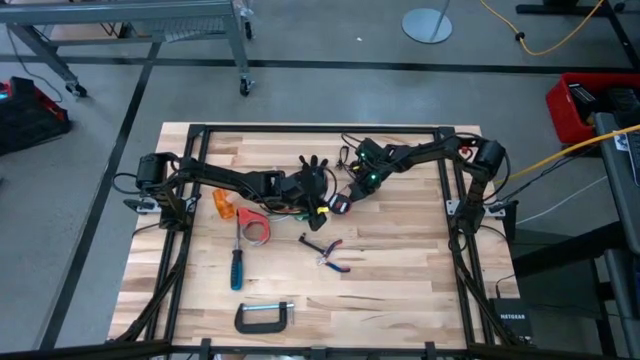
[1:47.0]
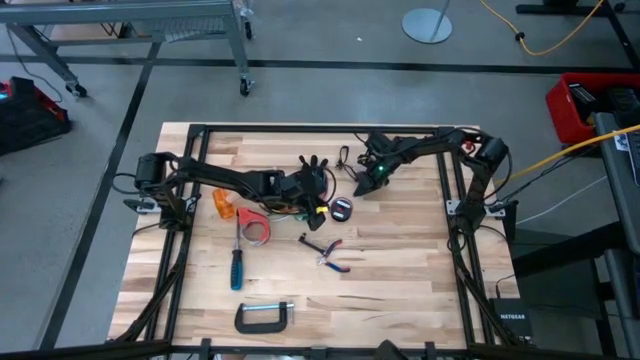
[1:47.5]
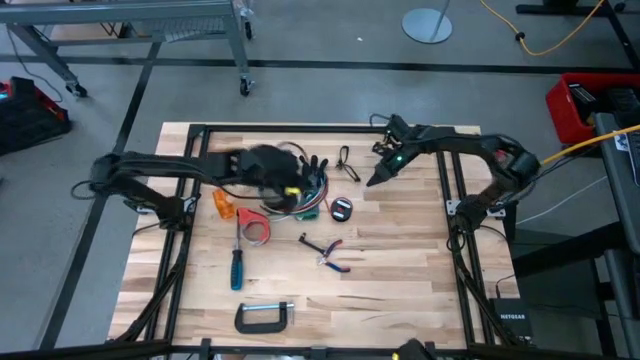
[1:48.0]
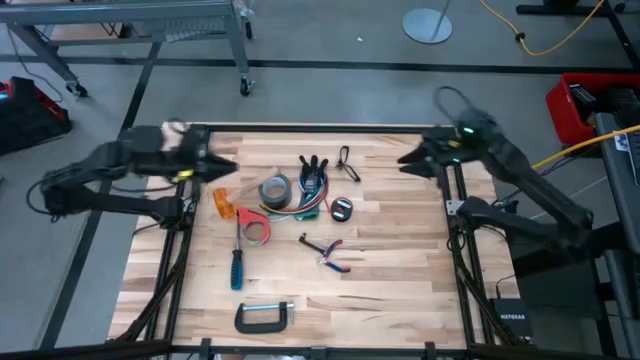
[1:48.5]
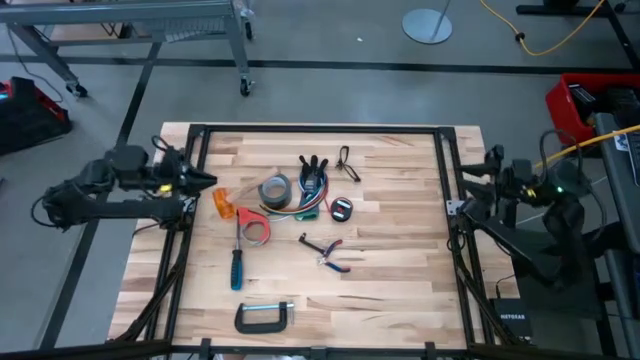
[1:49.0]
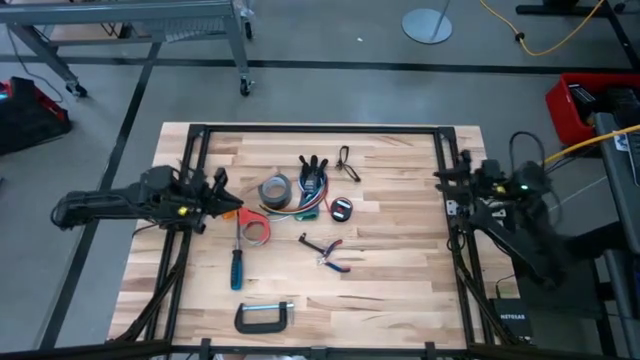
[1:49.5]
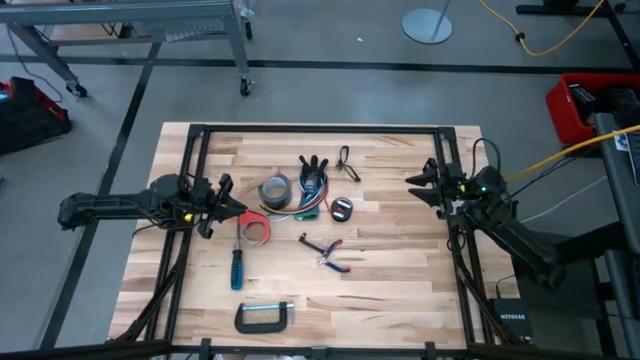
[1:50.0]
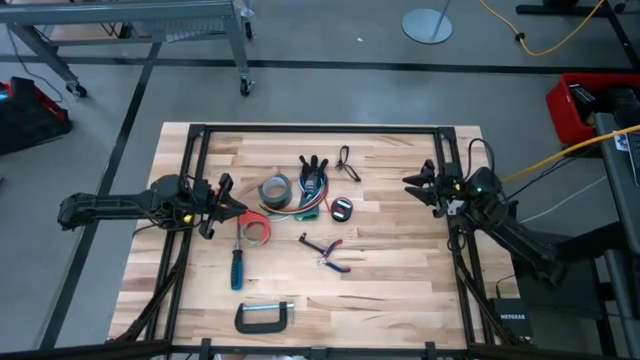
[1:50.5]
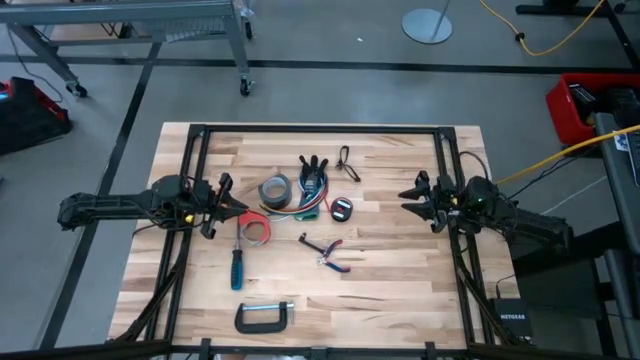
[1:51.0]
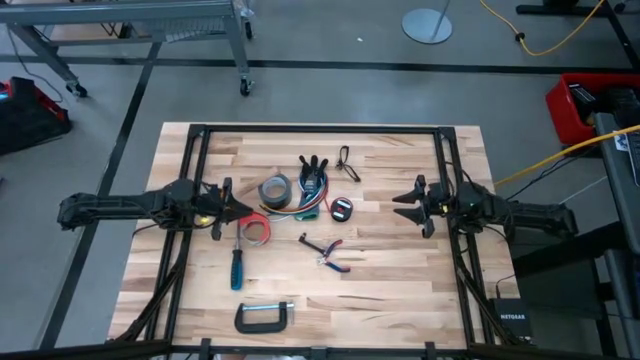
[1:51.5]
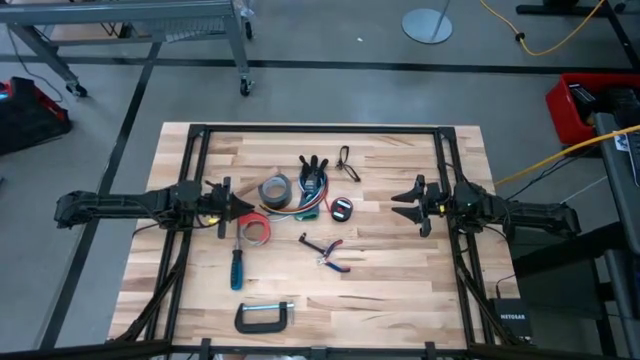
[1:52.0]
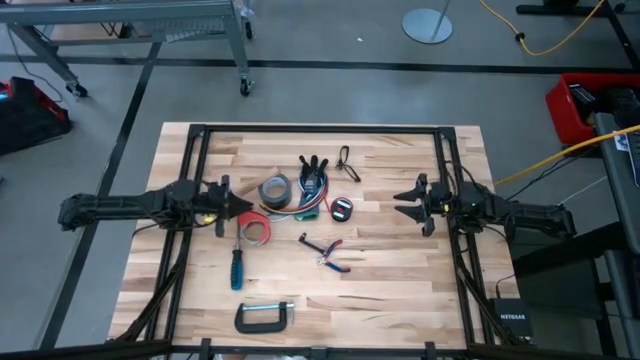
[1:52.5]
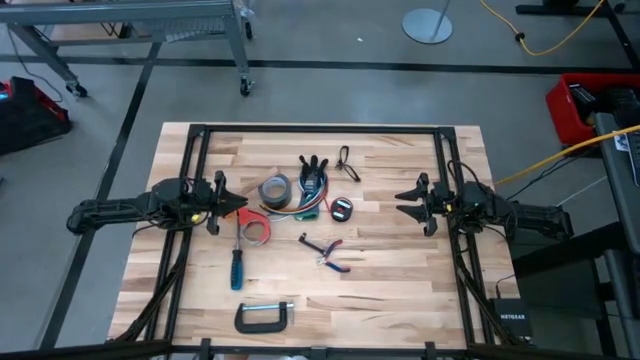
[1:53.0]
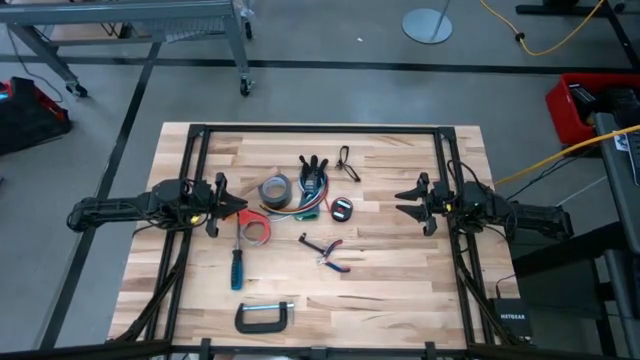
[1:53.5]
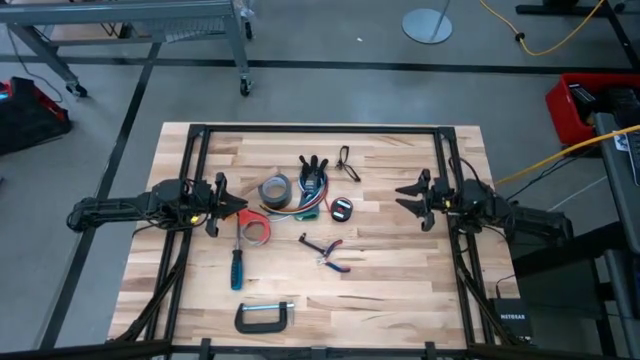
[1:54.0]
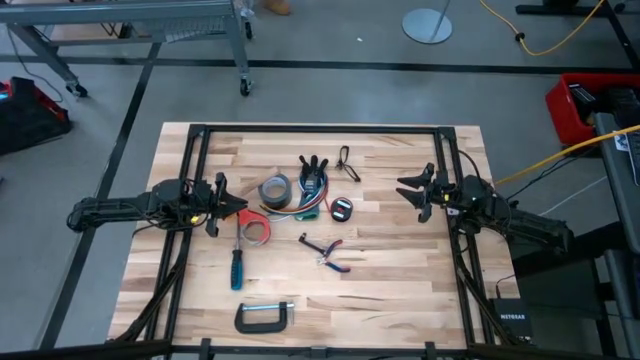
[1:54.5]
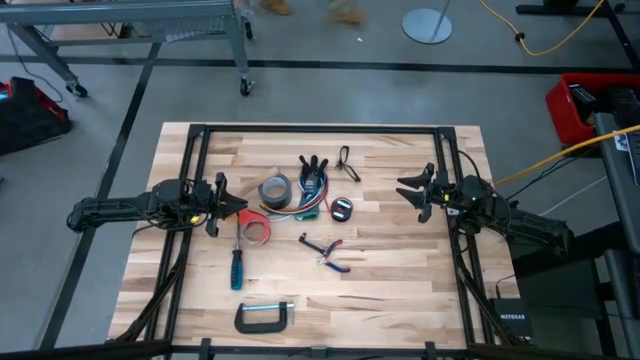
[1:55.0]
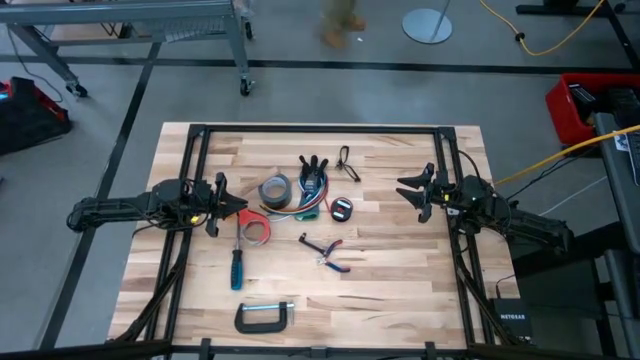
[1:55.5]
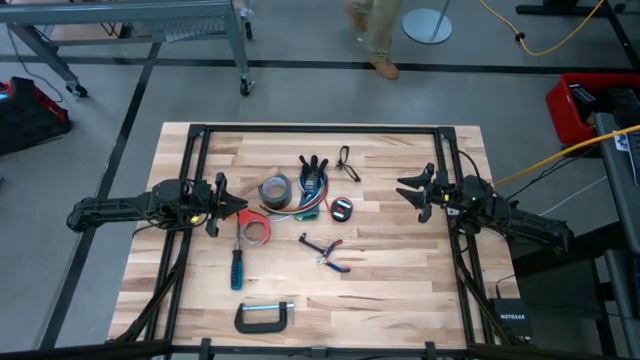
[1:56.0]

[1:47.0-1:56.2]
Task: Coil cords
Return to Home Position

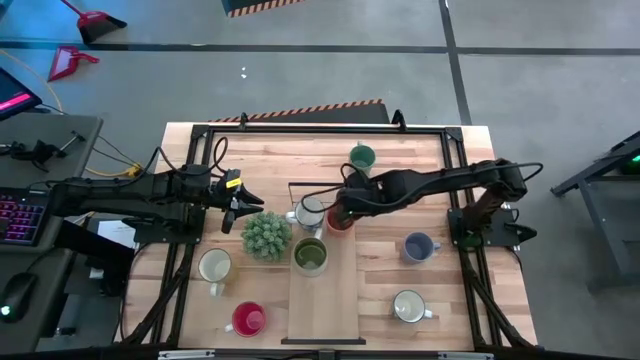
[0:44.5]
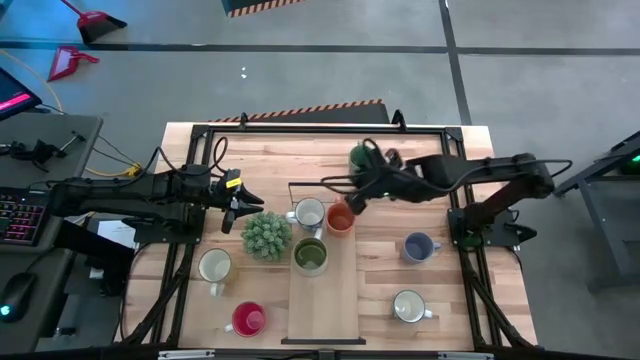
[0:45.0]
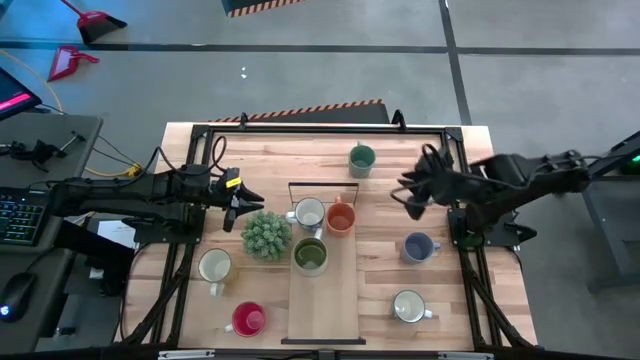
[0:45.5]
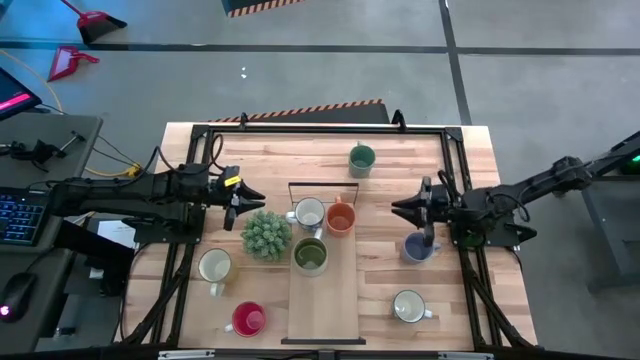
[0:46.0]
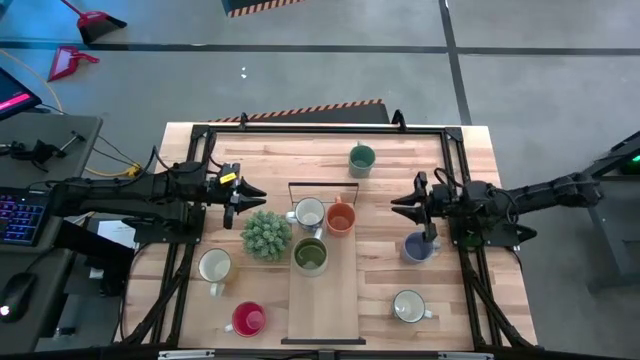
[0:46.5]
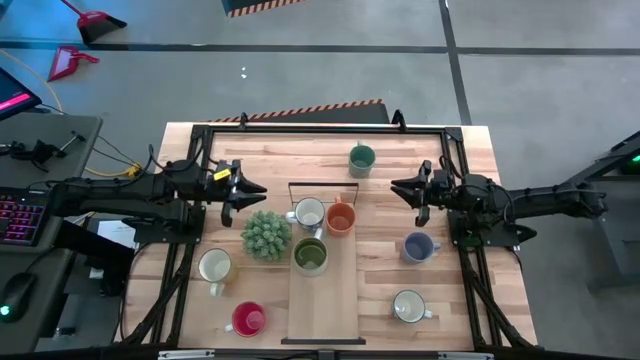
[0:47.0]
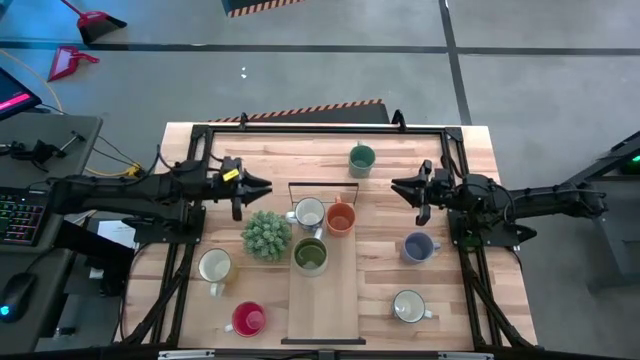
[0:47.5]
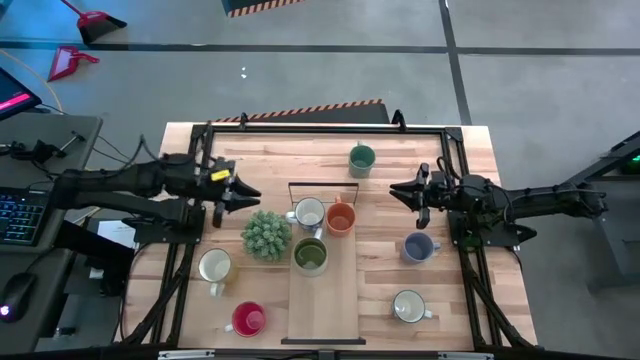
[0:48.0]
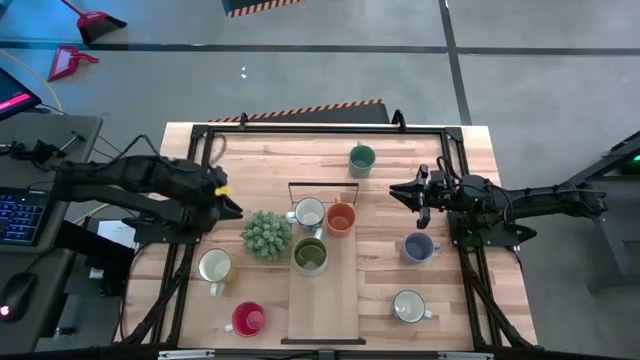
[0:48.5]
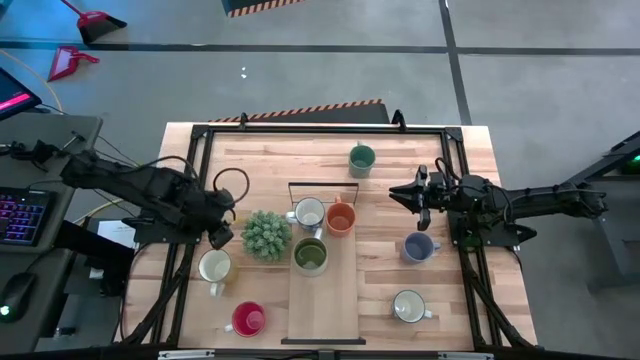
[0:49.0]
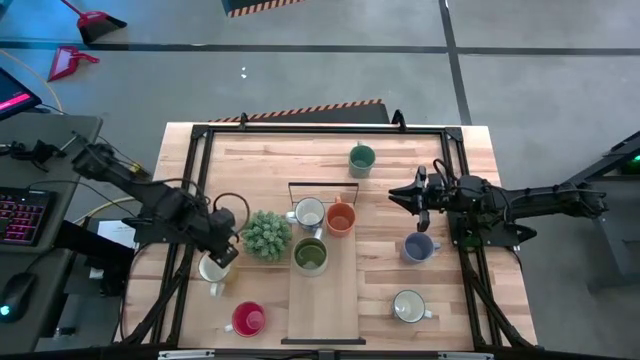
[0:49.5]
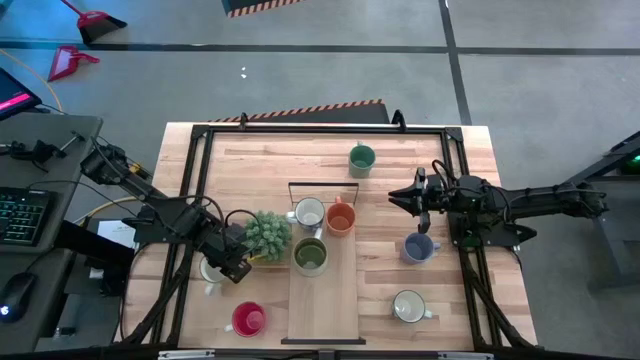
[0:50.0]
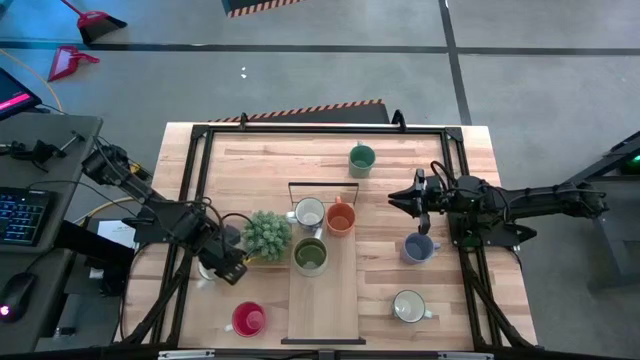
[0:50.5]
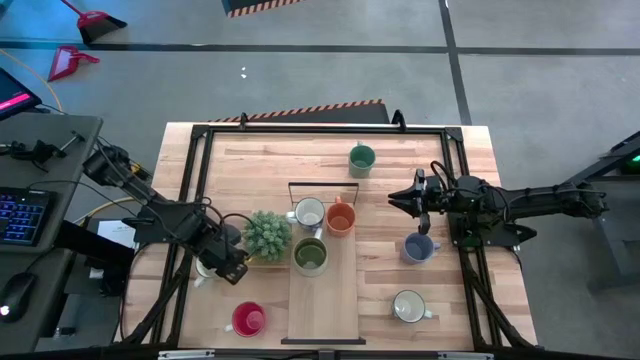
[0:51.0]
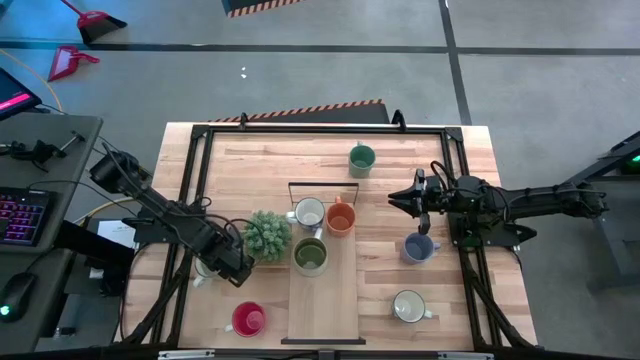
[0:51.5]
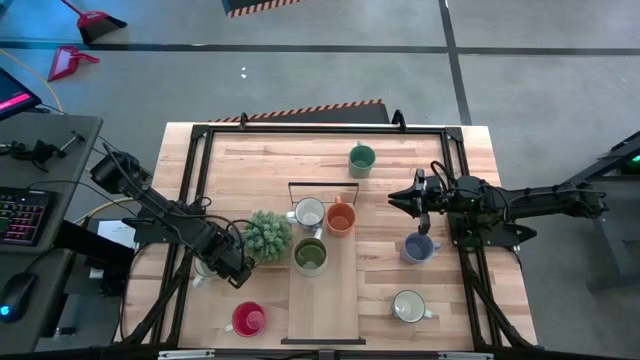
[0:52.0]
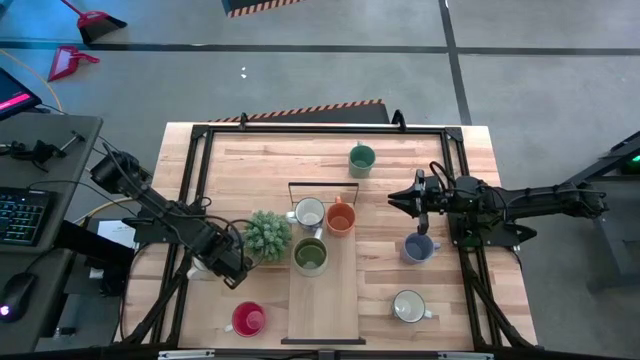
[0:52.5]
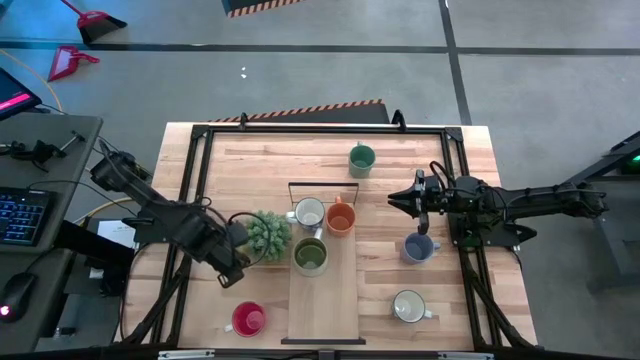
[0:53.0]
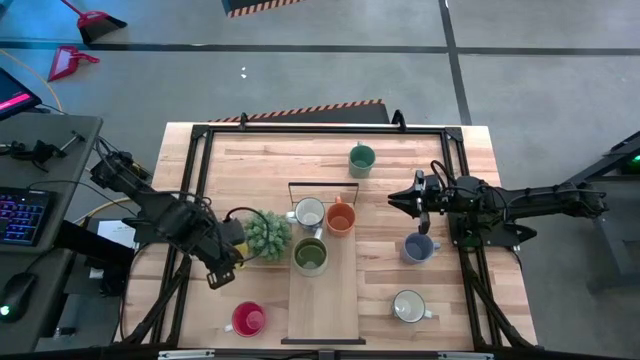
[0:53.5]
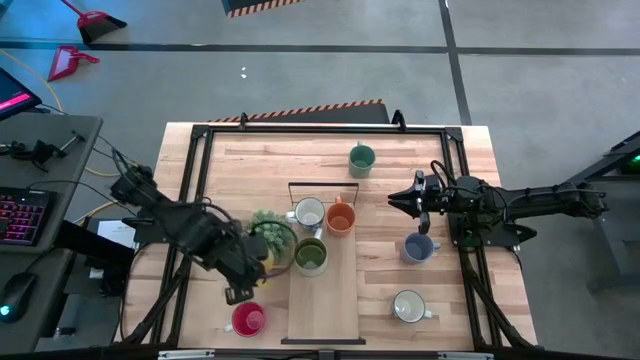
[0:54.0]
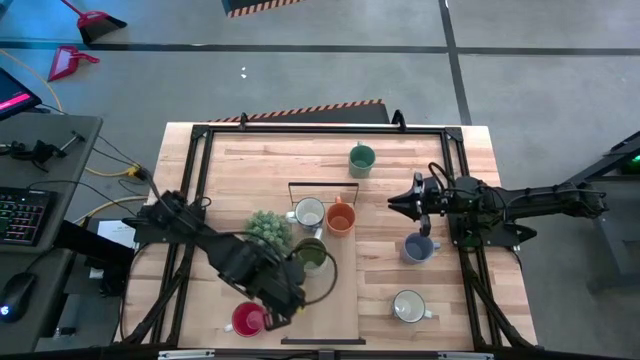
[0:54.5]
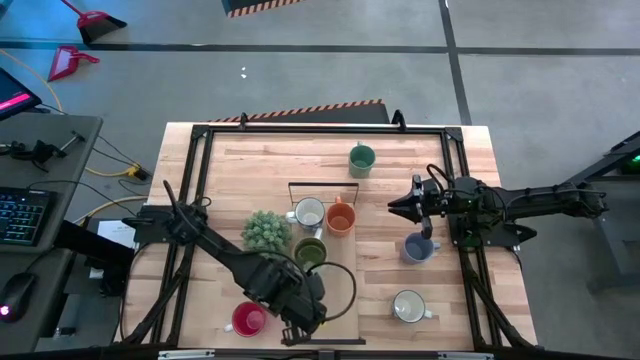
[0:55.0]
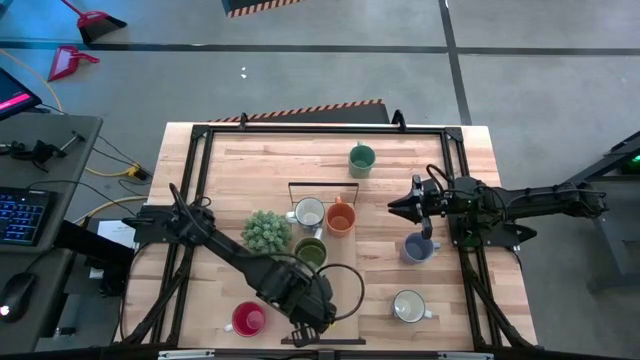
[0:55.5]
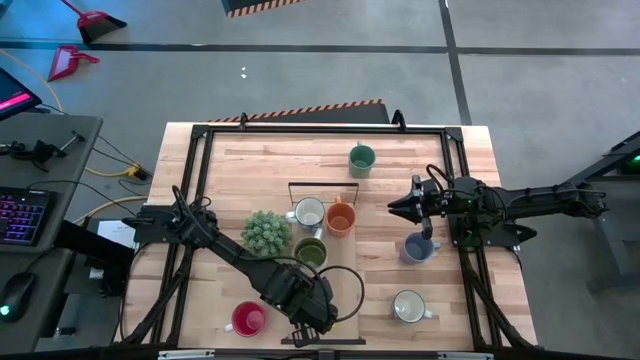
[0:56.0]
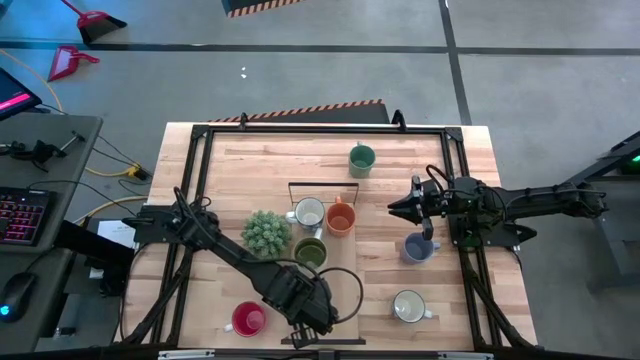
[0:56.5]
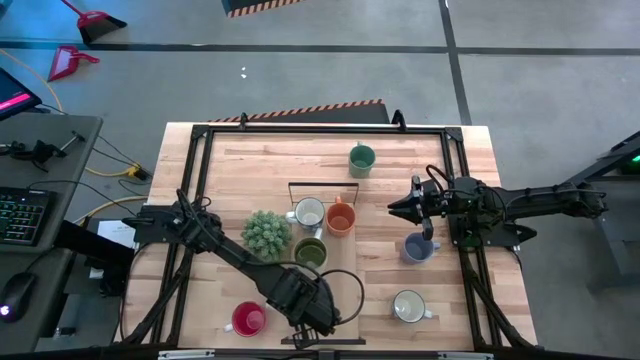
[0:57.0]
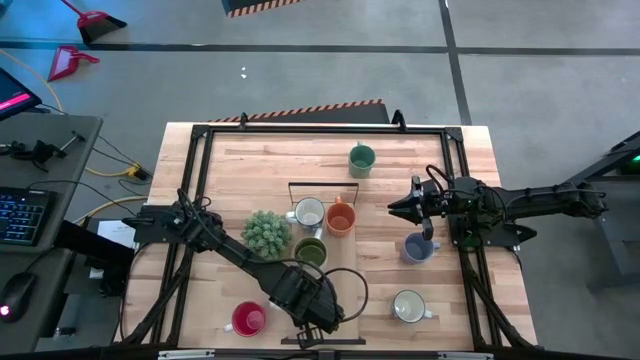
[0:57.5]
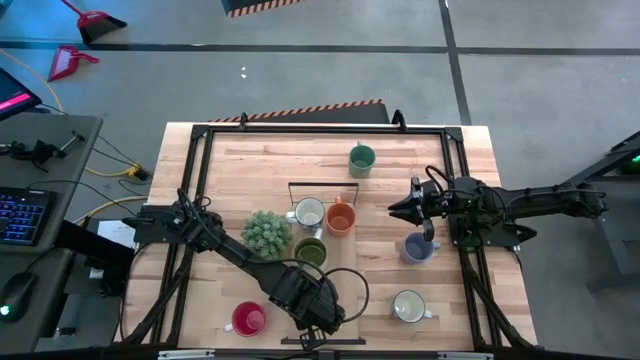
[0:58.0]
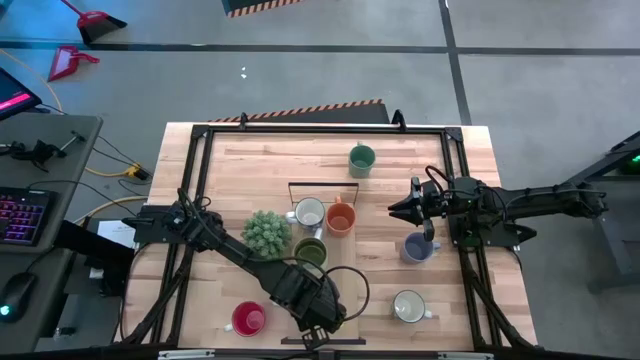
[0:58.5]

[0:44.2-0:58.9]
Task: Place coffee mugs
Put the yellow mug on the shelf
